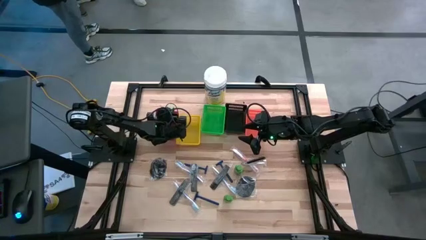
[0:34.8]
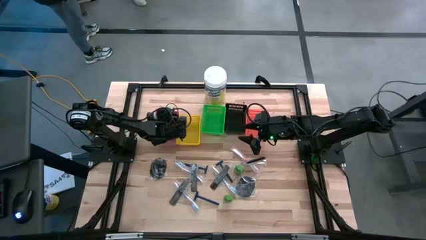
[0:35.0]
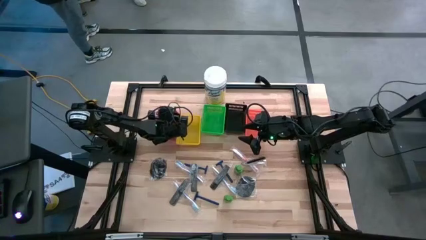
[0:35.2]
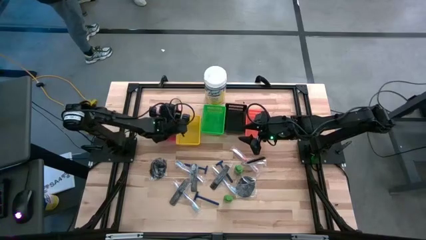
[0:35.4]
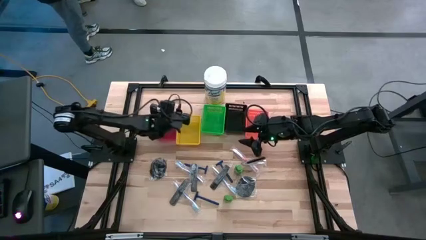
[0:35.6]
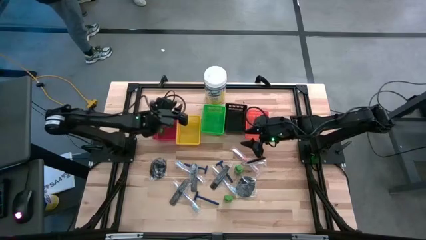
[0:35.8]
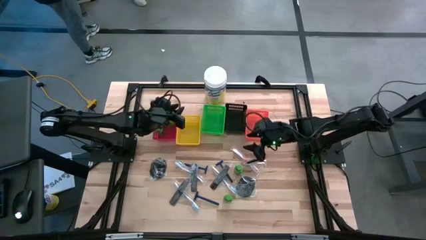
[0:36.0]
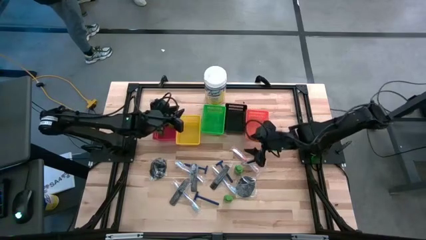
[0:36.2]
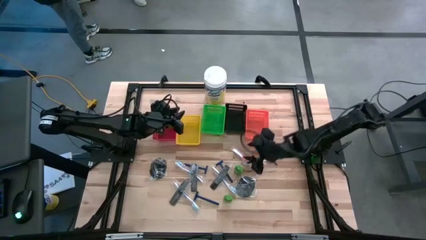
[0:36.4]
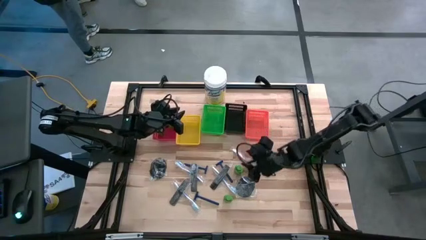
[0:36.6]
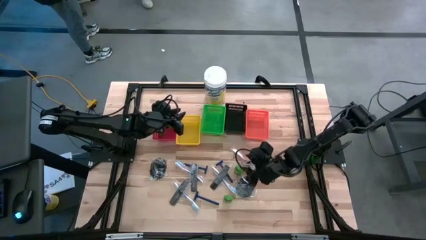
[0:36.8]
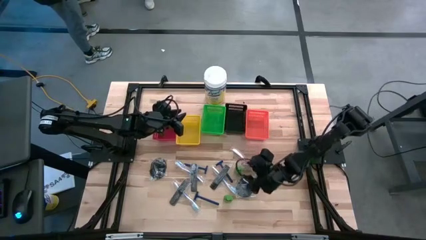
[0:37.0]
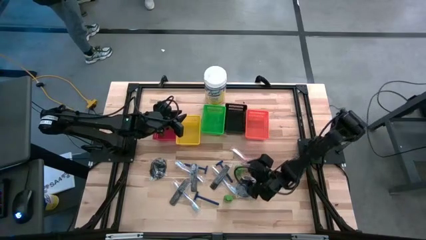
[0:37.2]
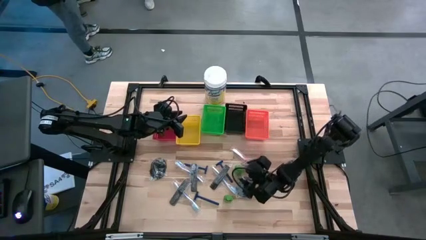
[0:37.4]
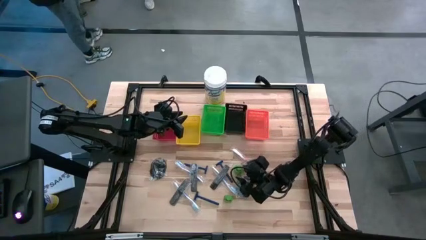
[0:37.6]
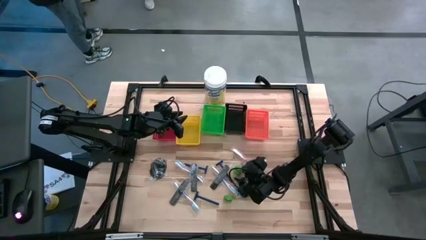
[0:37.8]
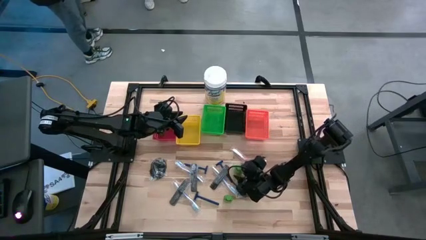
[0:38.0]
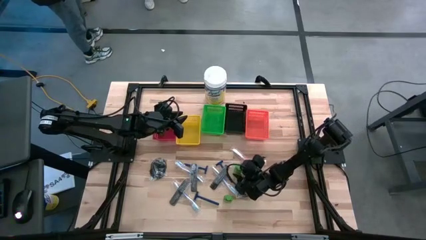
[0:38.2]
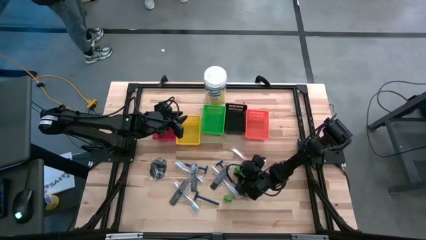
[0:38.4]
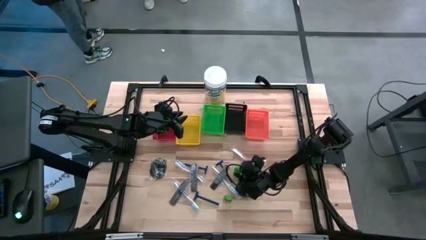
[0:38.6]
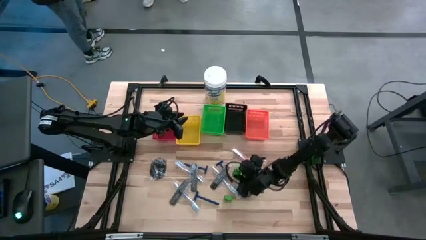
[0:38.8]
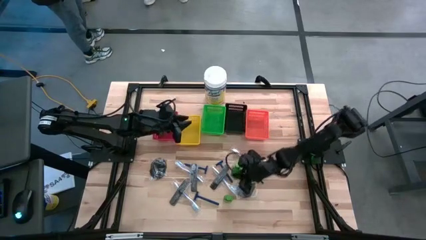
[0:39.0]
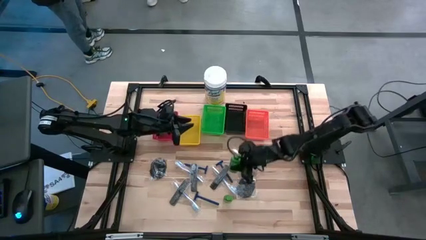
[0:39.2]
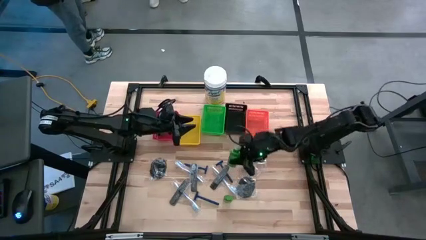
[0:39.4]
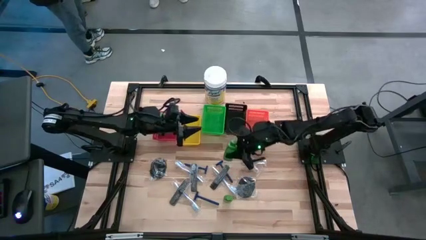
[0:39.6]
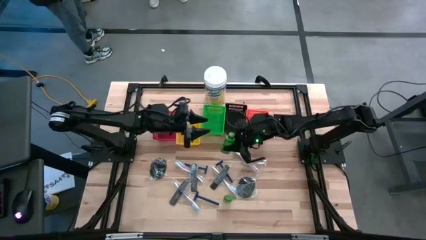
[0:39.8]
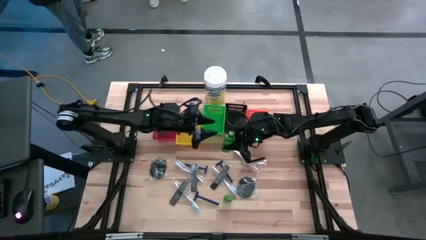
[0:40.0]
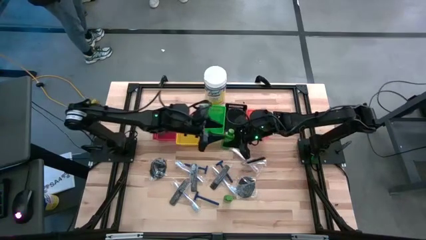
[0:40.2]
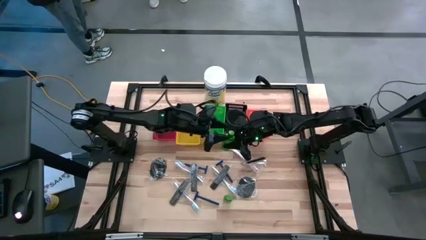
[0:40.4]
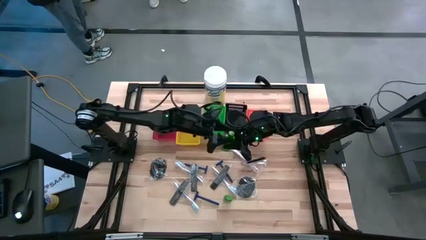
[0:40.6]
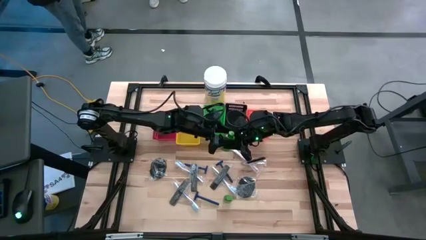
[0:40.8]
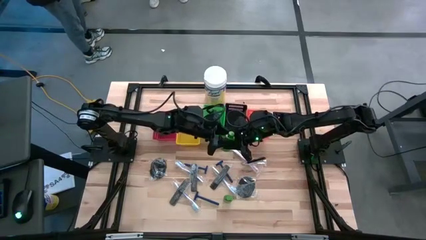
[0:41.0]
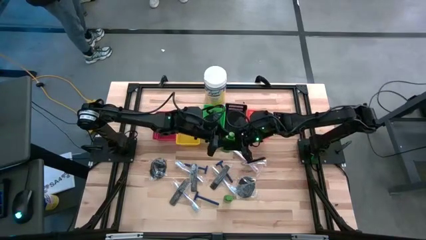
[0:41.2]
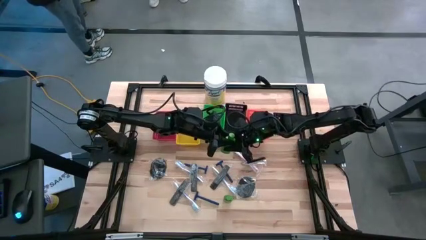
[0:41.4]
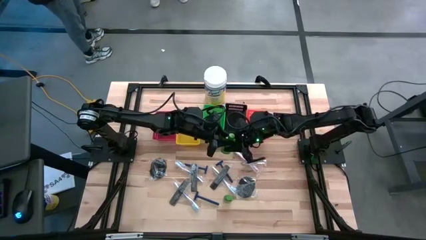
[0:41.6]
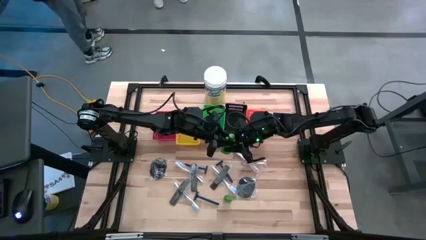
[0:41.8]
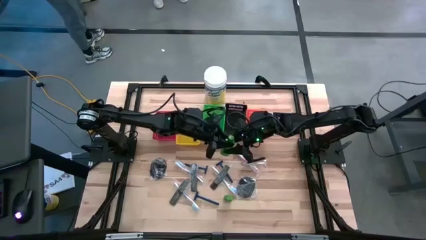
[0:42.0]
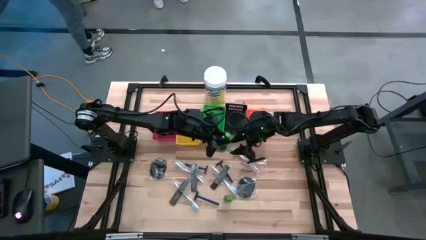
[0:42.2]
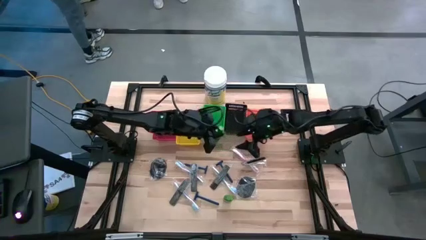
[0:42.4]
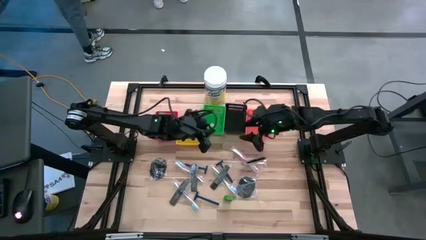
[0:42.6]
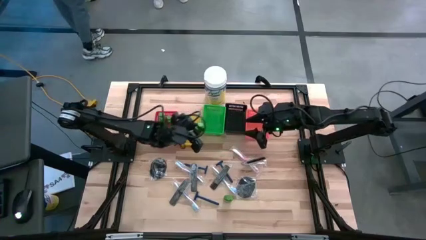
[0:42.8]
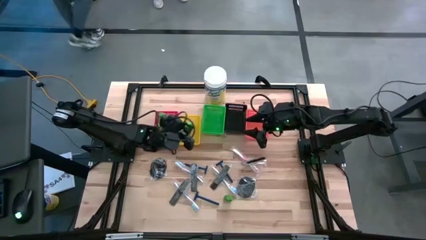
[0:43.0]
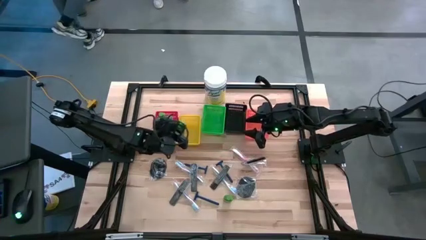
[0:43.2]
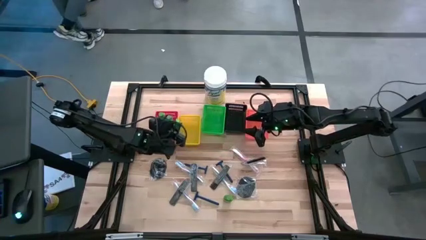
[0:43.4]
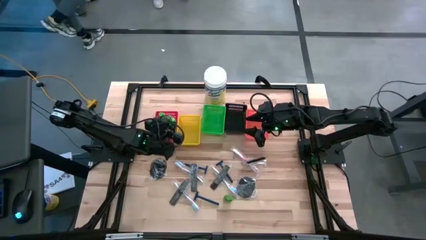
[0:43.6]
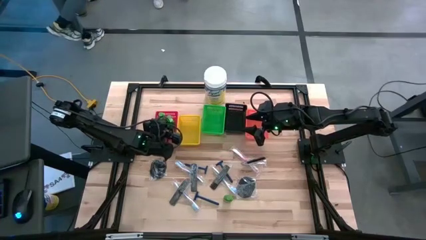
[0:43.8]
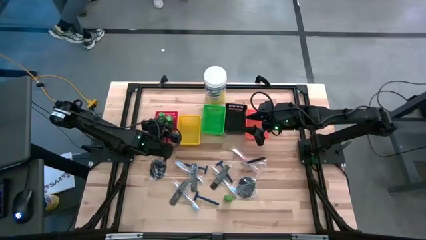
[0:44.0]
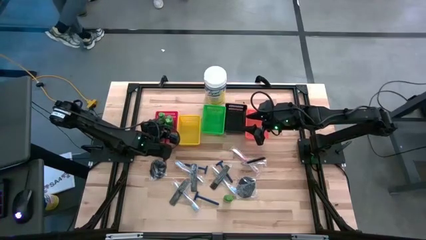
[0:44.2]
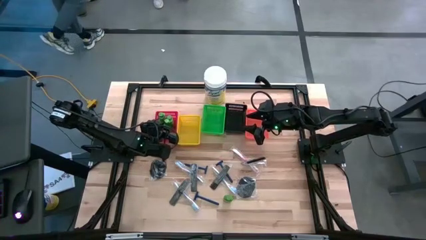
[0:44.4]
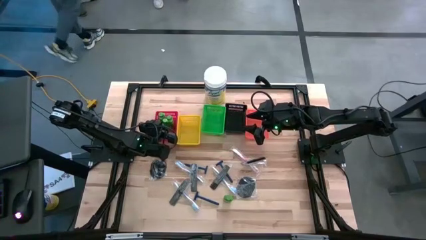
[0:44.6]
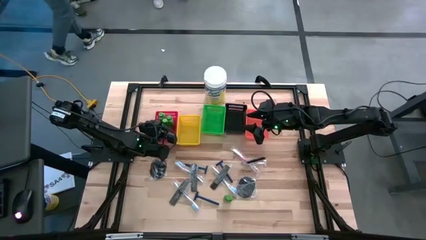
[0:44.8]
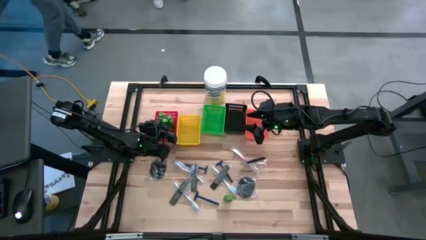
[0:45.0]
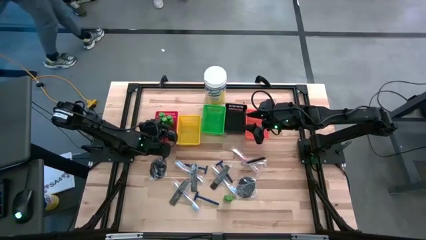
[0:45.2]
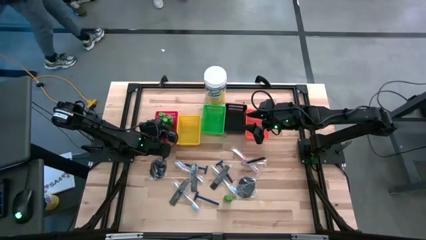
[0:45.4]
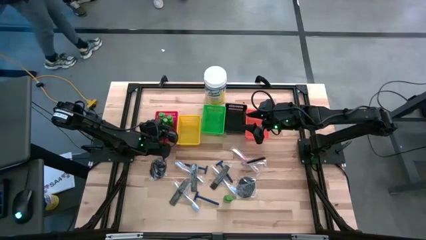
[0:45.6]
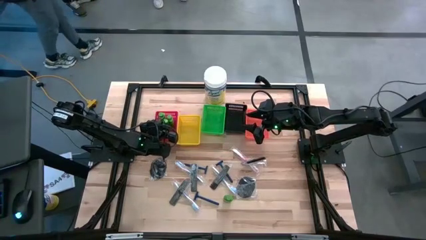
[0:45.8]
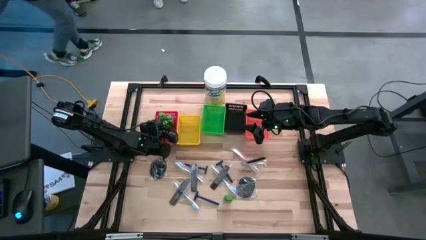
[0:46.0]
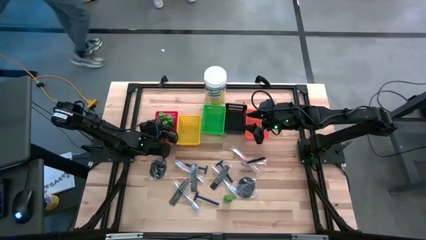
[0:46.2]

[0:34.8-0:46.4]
Task: Pick & Place Travel size toiletries
Put the green shampoo bottle into the red bin

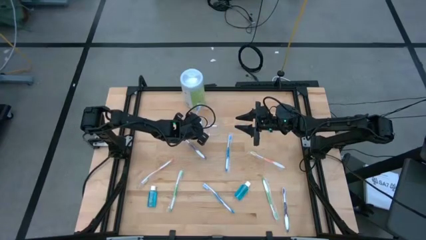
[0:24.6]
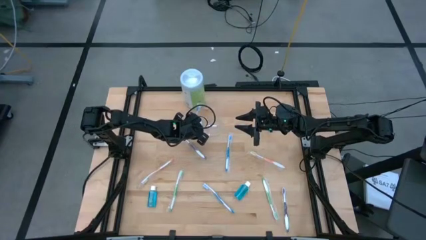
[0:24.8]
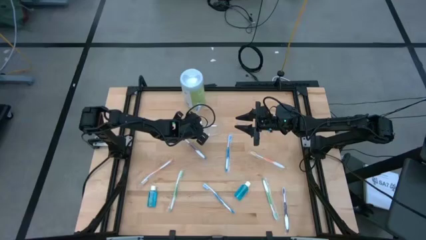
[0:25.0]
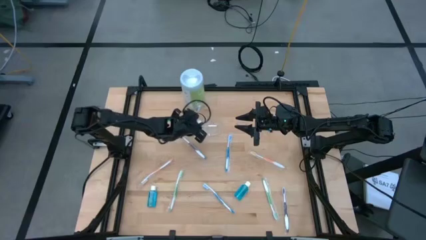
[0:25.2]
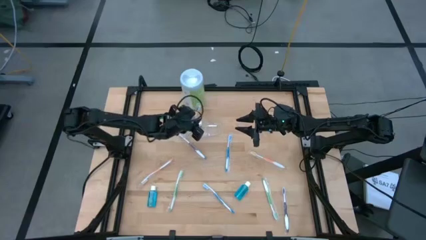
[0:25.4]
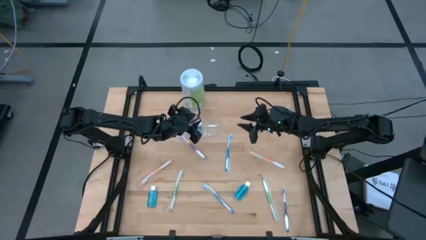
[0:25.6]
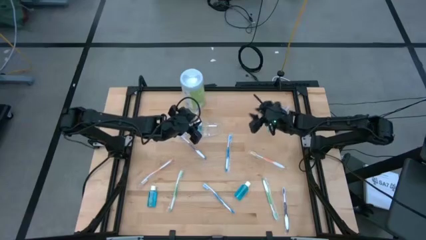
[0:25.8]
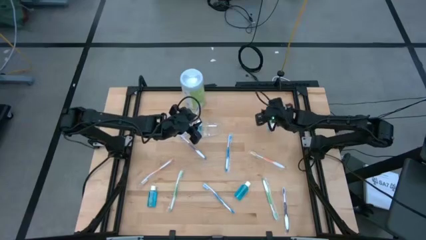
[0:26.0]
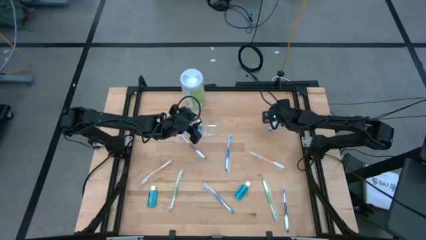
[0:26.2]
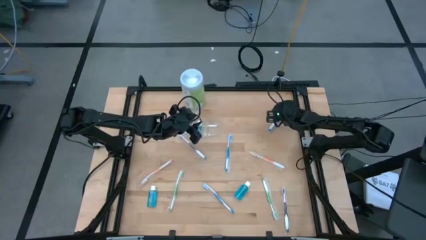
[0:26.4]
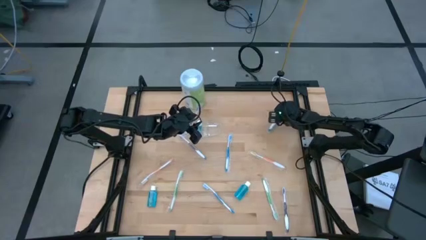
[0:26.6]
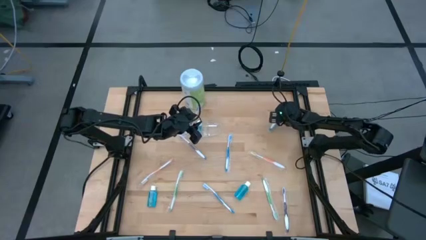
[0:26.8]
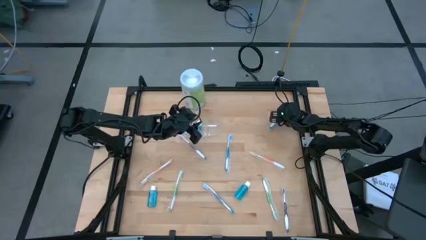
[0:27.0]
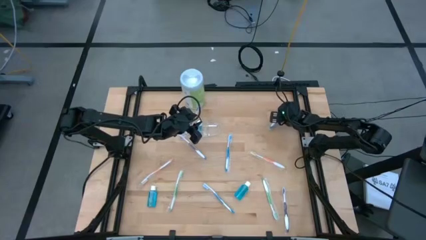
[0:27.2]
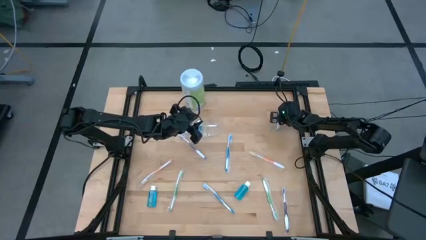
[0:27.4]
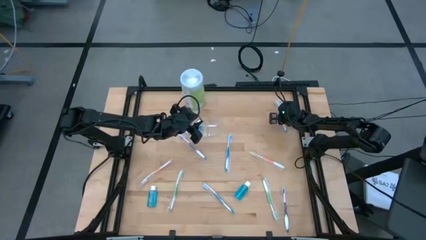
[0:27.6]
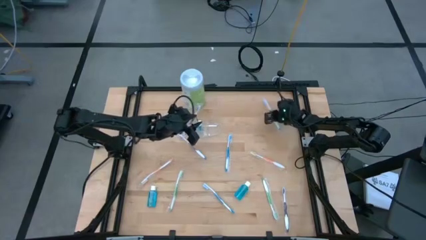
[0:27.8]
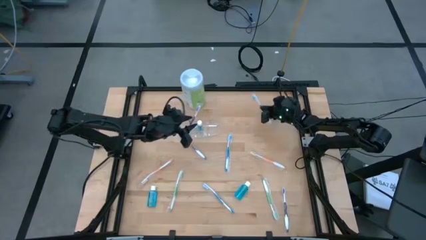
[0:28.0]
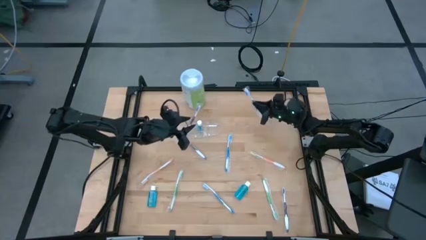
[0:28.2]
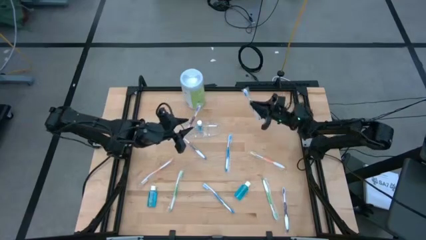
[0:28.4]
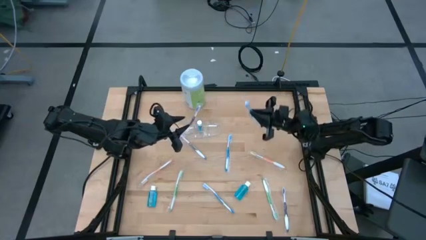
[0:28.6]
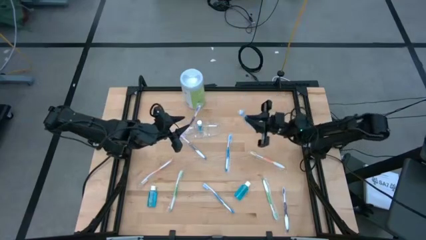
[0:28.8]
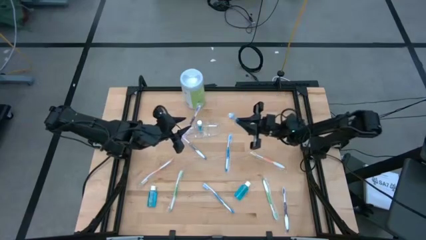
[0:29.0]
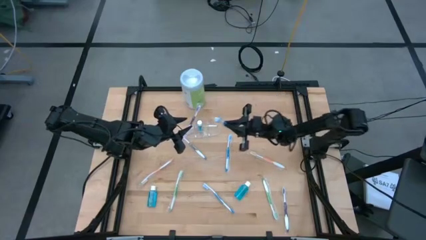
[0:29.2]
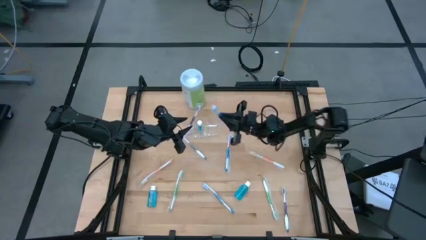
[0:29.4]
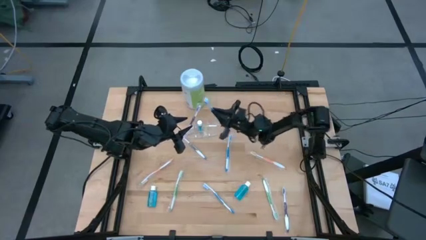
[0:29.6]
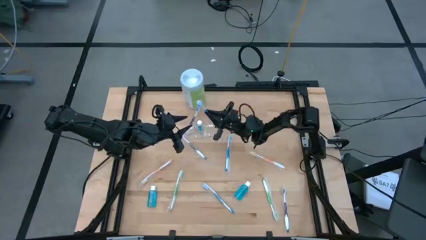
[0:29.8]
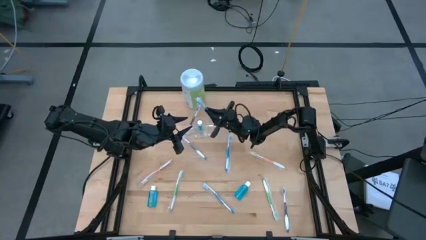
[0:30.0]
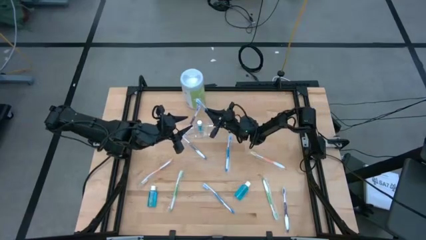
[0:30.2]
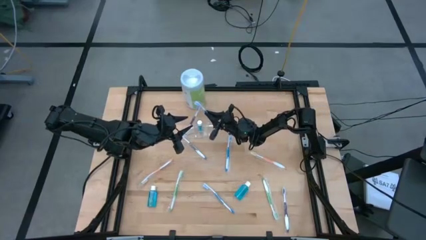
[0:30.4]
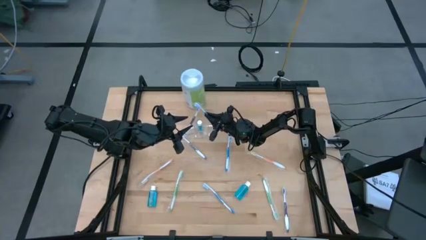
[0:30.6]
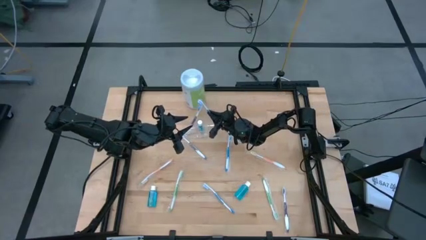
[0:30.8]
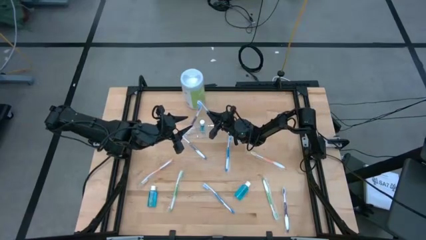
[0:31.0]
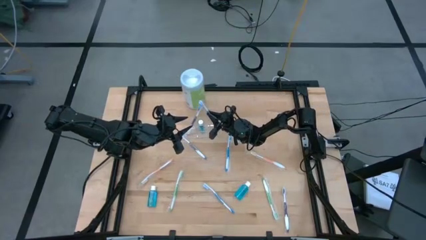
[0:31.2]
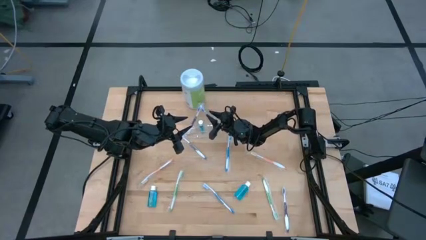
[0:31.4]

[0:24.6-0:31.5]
Task: Pick & Place toothbrushing station
Put the right blue toothbrush into the right side of the transparent organizer
